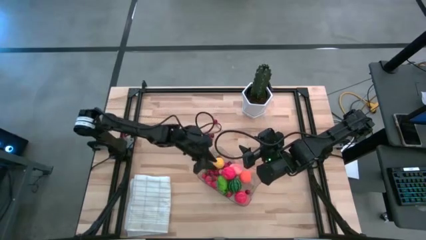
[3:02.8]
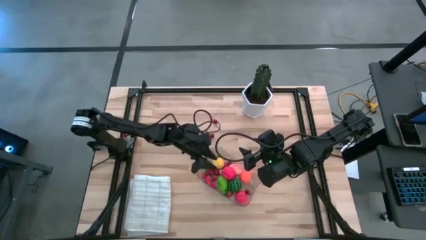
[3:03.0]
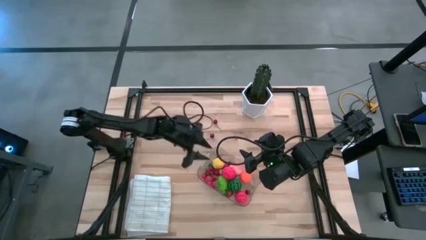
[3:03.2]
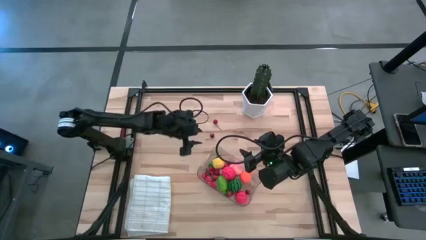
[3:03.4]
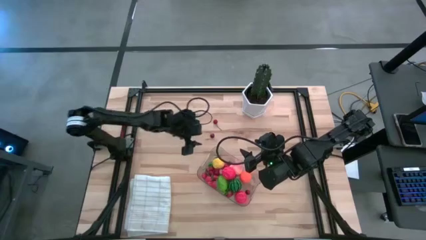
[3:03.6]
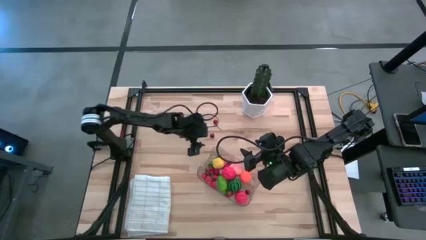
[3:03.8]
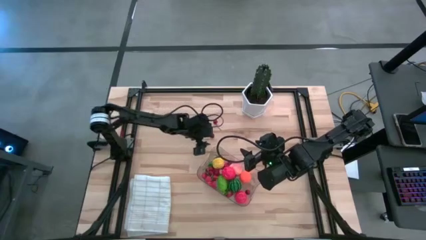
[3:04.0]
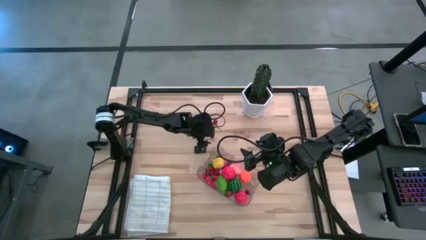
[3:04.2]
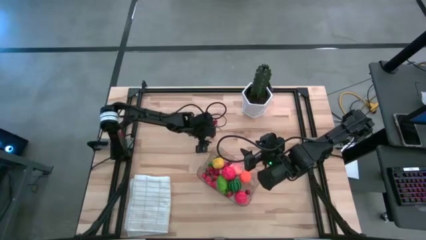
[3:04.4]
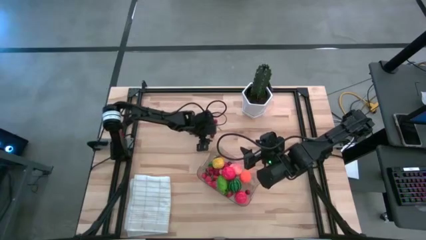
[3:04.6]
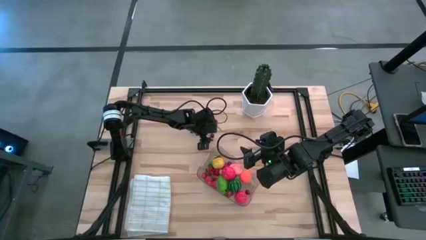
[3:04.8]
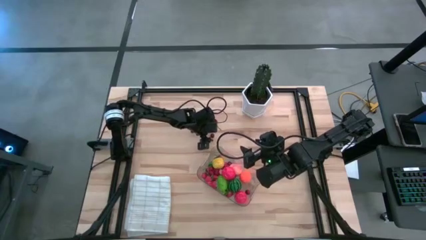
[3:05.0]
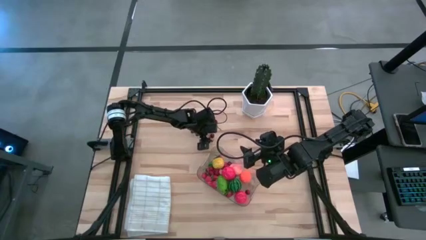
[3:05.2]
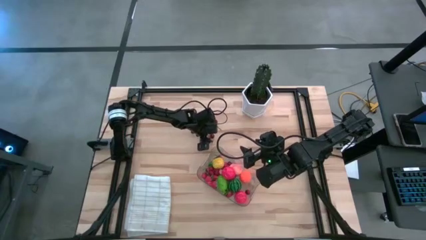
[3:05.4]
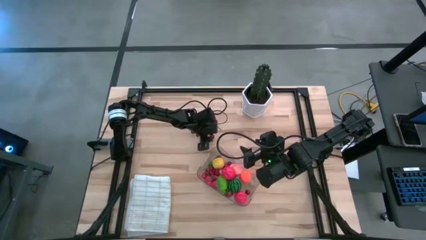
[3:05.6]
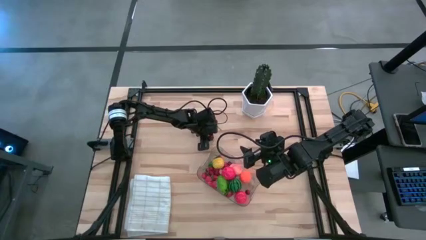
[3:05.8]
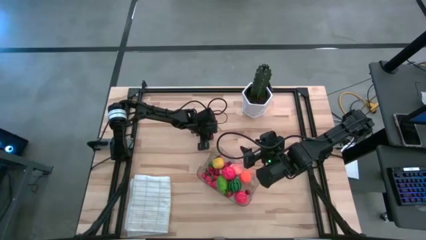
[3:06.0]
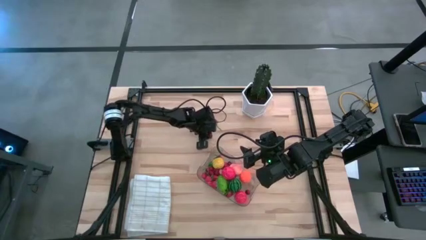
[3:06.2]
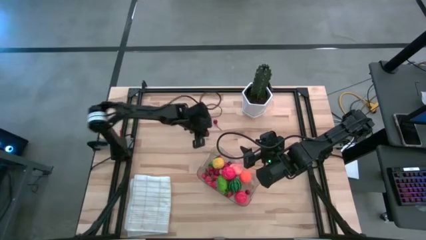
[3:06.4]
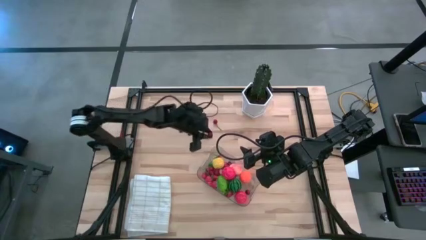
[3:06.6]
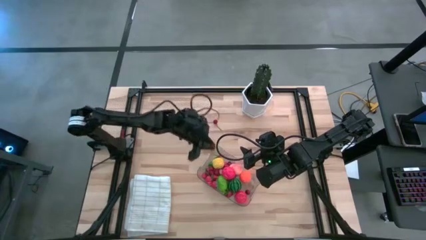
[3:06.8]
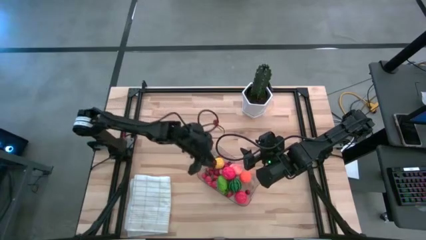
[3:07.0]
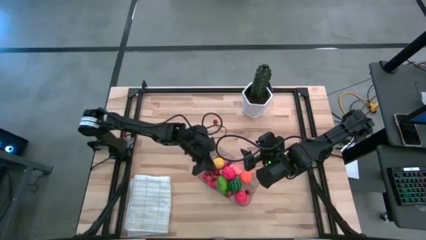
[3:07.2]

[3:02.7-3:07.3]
Task: Pick and placing Produce into tupperware
Put the red cherry into the transparent bin

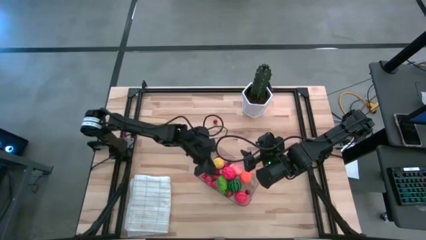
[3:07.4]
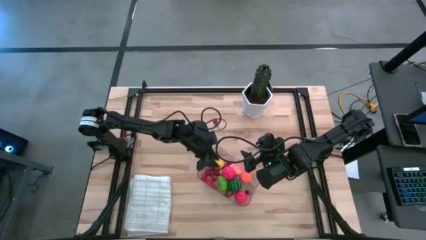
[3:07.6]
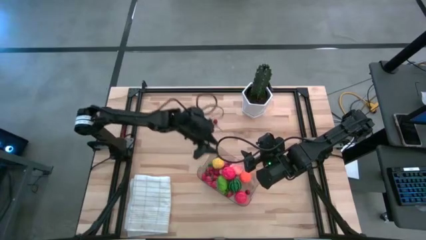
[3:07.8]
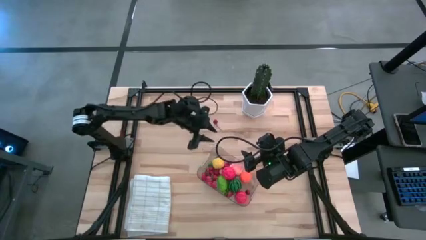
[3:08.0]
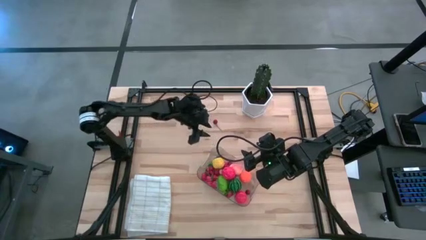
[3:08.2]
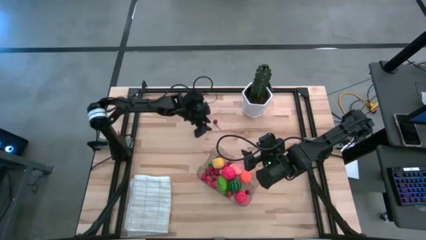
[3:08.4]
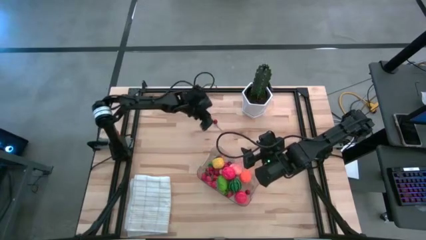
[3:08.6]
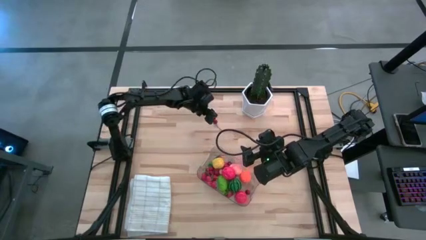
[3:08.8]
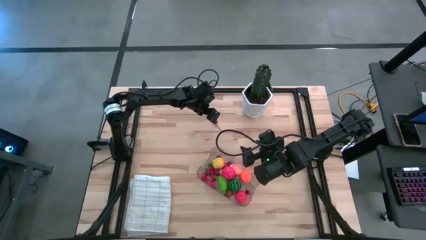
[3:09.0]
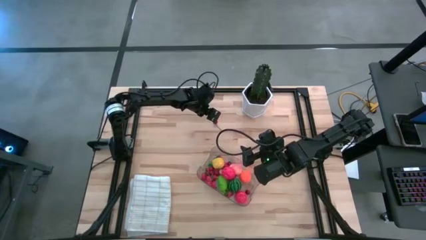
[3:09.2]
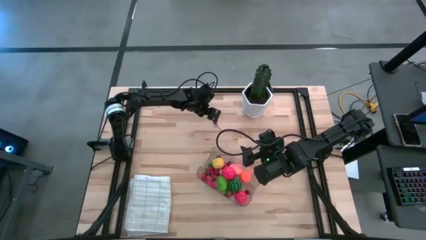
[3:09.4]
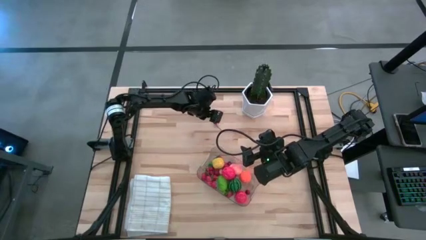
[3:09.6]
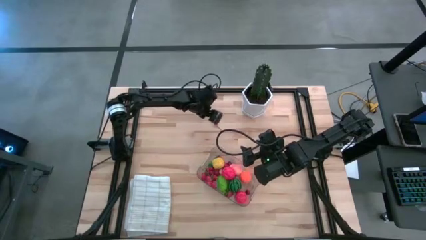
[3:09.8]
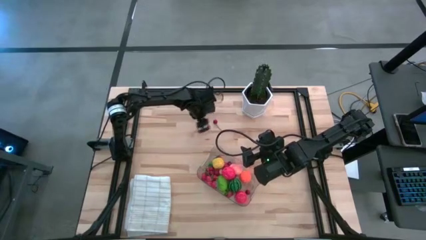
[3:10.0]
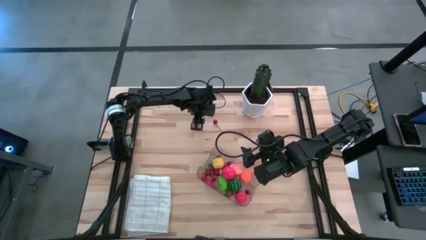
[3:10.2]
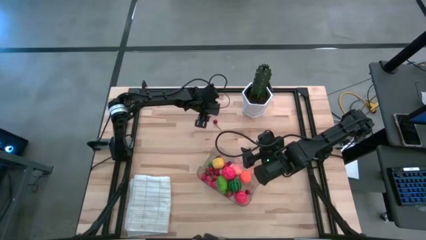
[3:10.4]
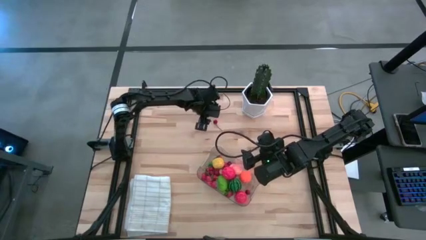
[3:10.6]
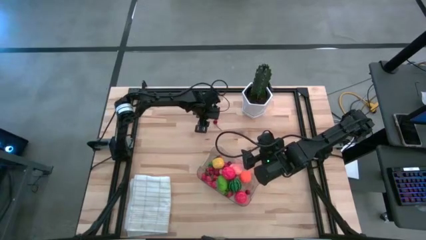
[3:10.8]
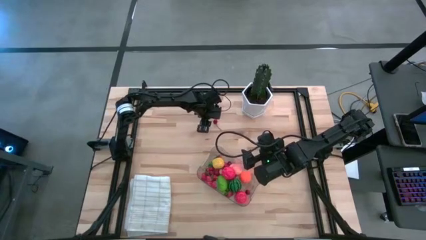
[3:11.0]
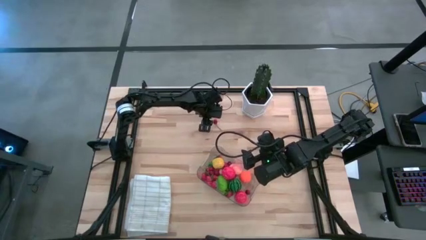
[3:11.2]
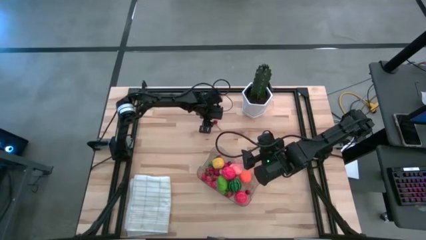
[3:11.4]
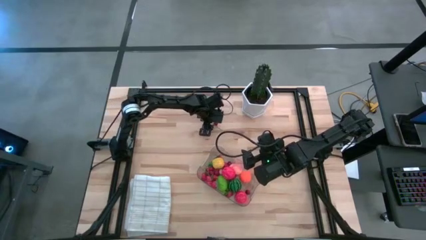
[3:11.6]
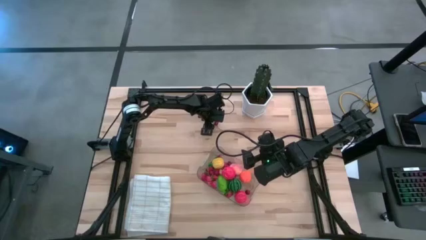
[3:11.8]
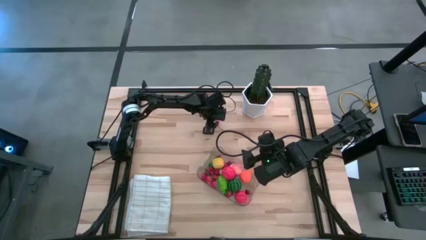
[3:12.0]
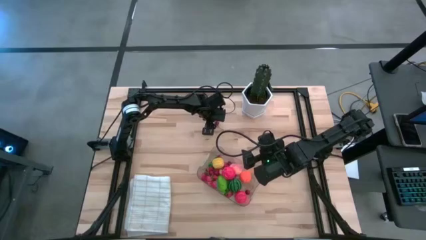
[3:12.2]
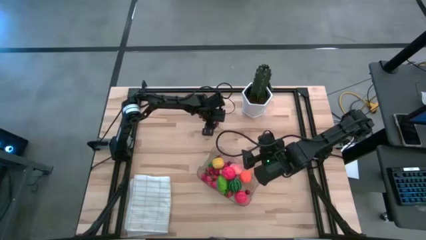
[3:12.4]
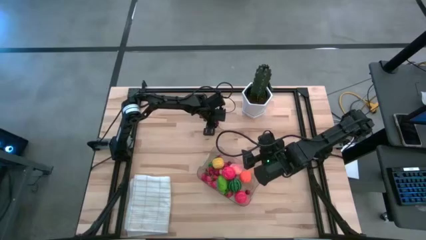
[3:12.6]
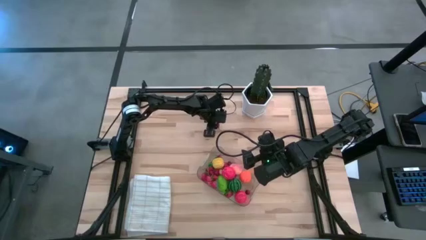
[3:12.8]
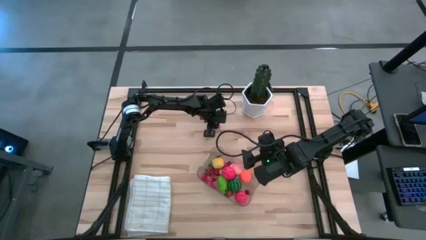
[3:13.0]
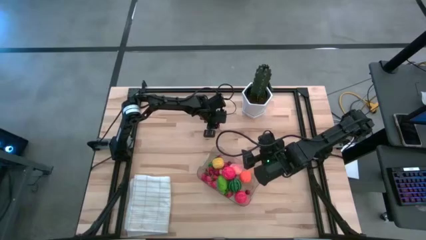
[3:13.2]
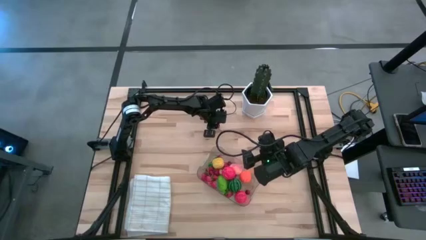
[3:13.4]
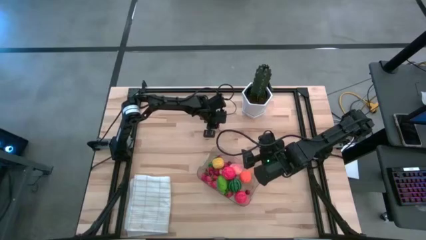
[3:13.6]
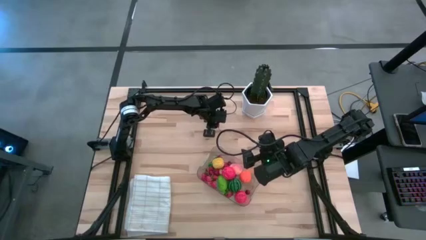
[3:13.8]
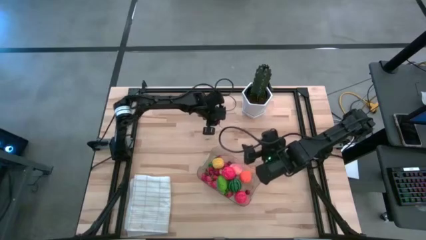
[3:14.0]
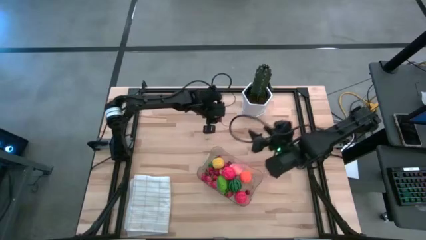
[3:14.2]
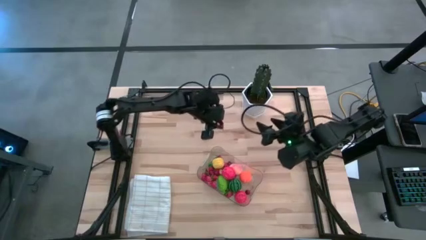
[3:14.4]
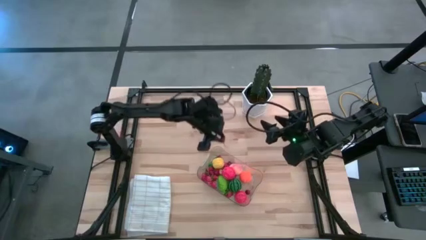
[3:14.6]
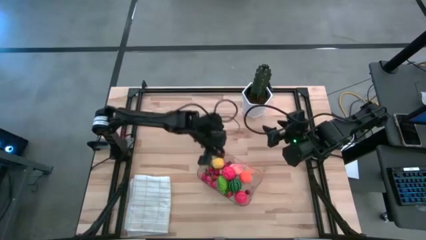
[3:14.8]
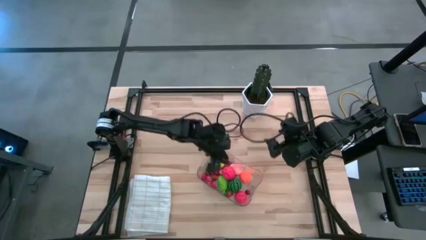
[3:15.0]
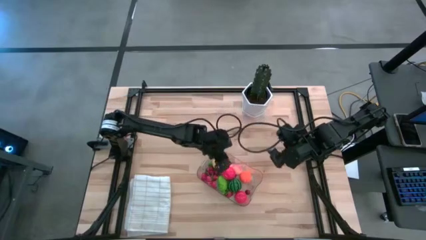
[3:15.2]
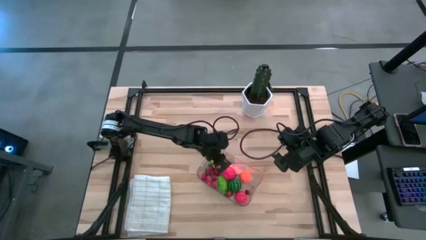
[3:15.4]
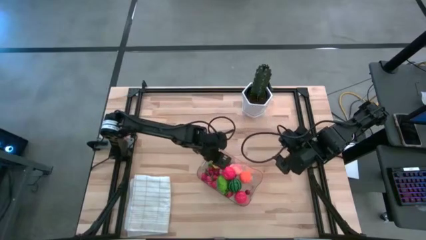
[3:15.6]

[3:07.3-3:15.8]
Put the red cherry into the transparent bin

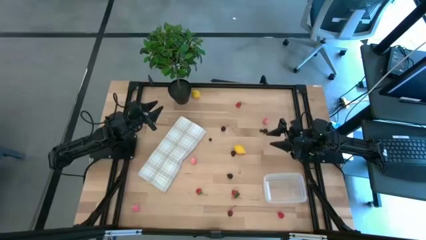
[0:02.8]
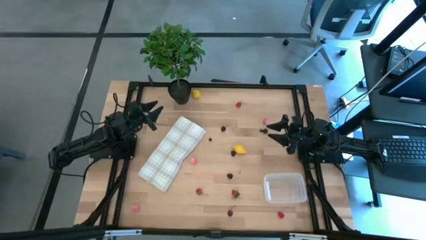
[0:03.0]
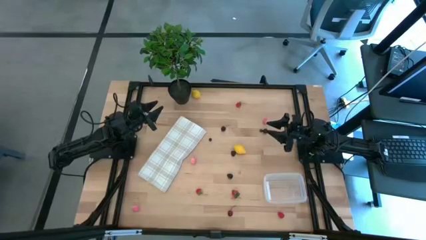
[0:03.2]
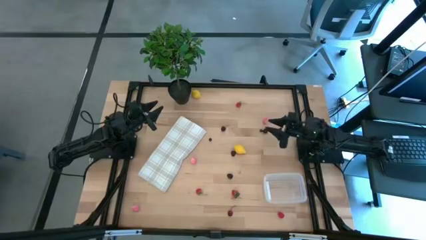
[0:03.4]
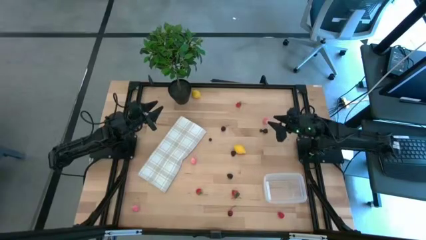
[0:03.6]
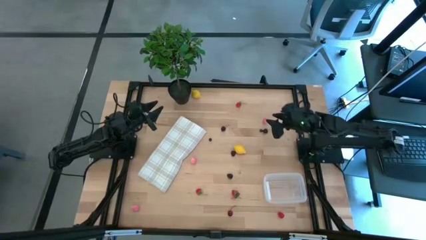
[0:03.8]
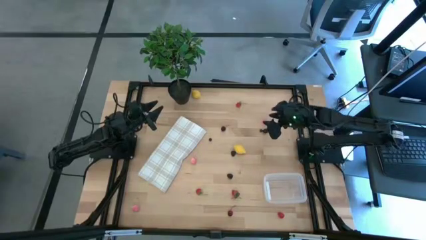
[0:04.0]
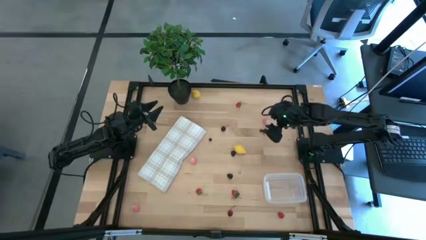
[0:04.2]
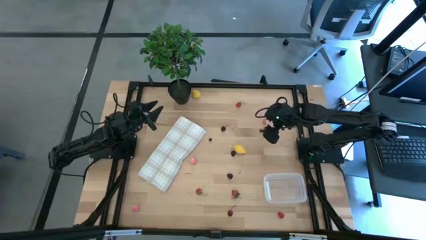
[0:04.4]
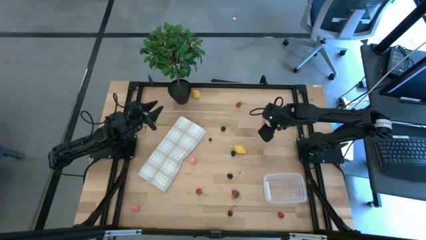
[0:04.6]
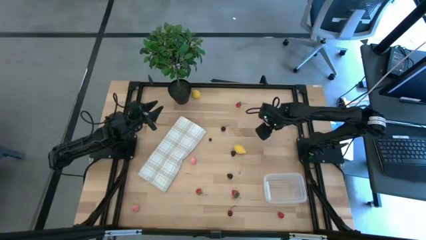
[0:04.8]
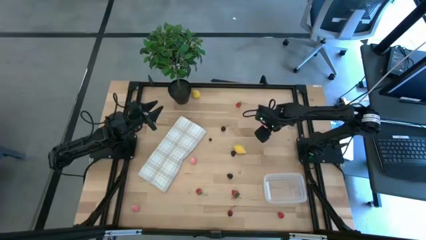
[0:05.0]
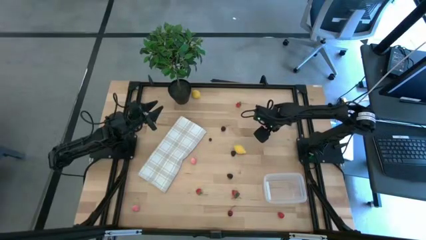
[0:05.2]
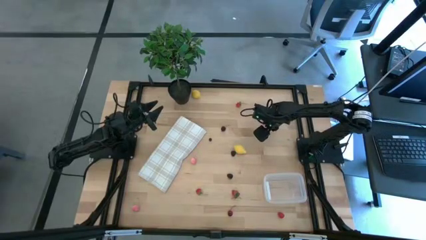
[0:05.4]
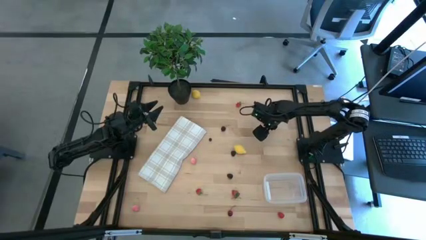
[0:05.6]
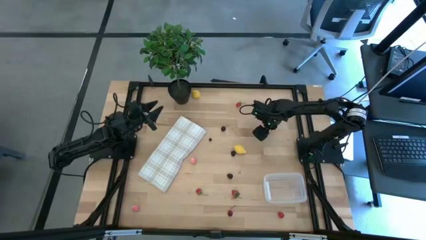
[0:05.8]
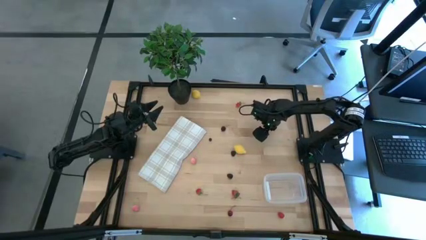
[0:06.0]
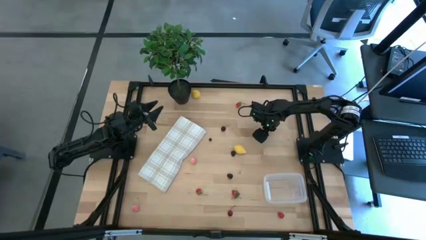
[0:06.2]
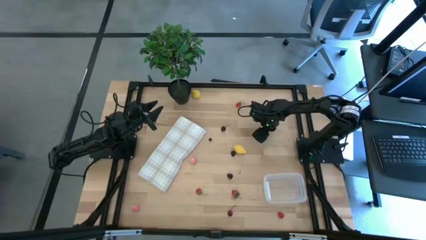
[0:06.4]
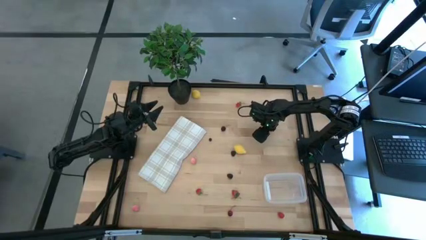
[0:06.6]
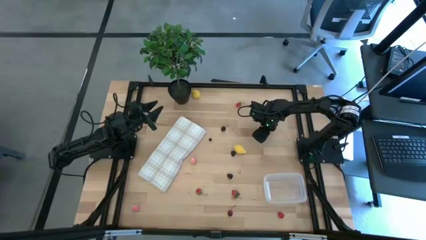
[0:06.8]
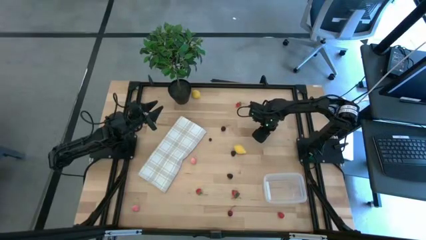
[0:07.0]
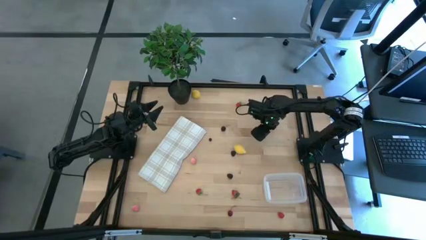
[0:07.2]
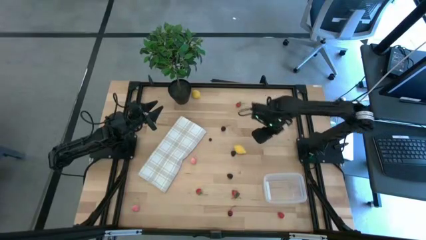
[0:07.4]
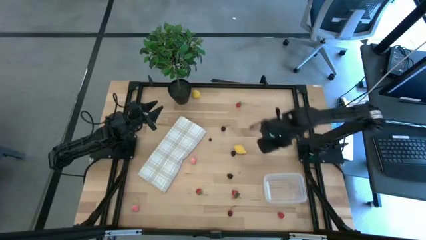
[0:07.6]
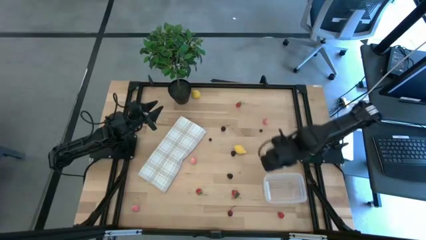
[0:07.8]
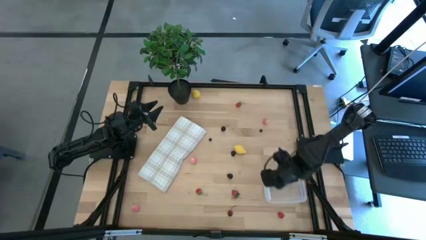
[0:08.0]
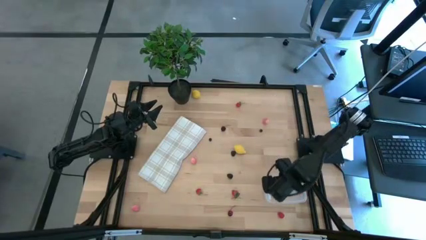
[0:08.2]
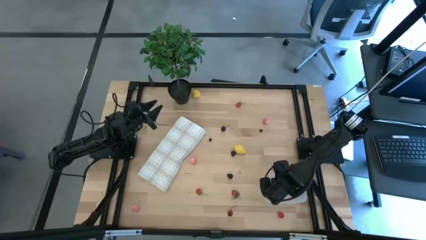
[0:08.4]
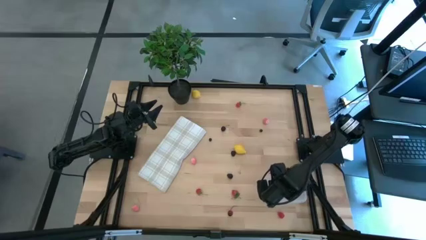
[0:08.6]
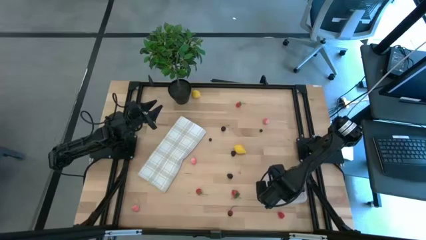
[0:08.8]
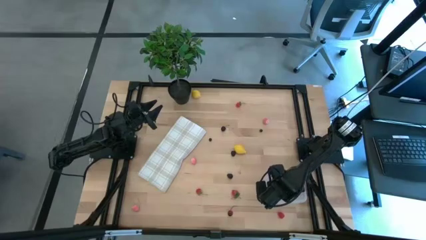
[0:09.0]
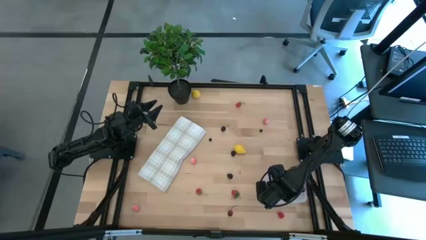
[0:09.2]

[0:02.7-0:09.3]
Task: Pick and placing Produce into tupperware
Put the right black cherry into the transparent bin
